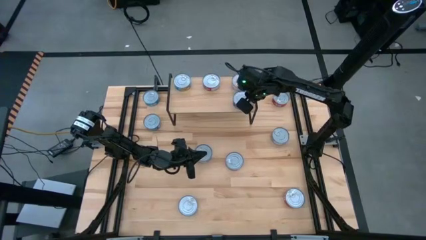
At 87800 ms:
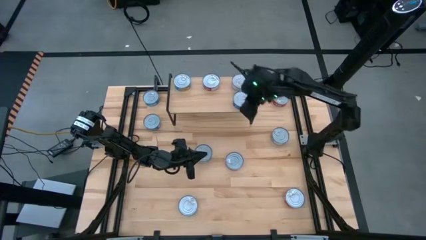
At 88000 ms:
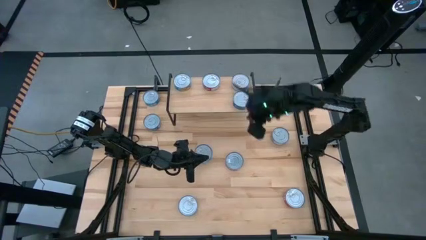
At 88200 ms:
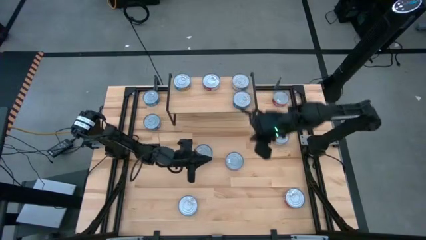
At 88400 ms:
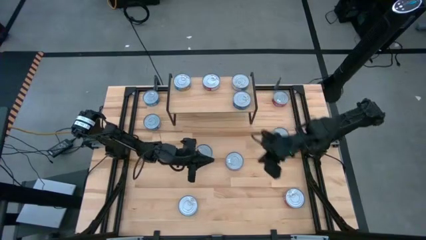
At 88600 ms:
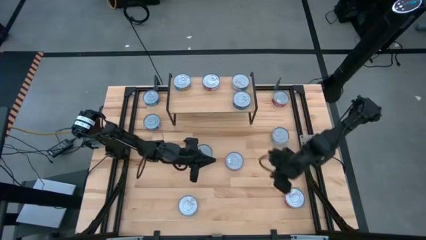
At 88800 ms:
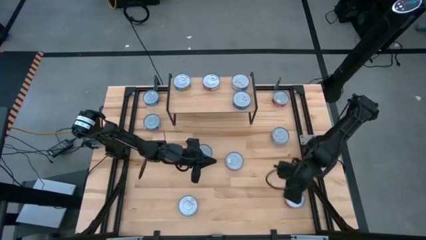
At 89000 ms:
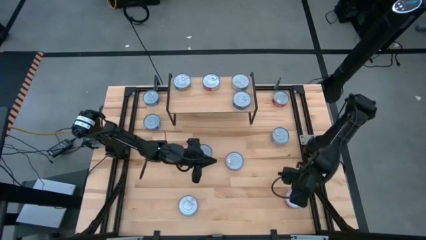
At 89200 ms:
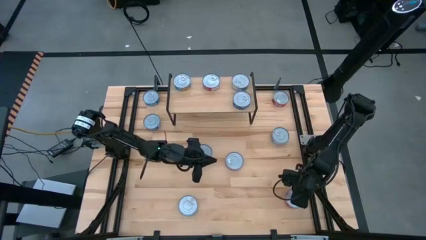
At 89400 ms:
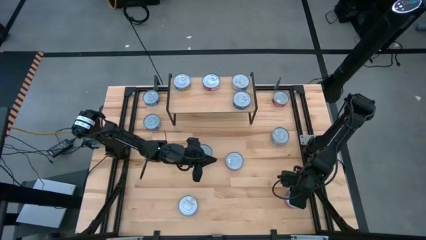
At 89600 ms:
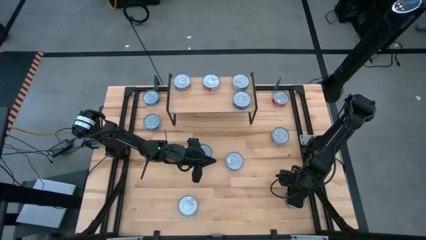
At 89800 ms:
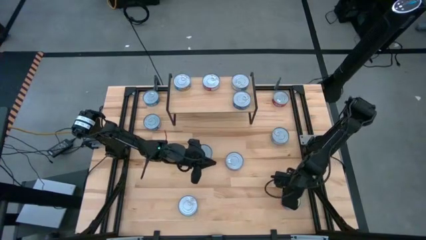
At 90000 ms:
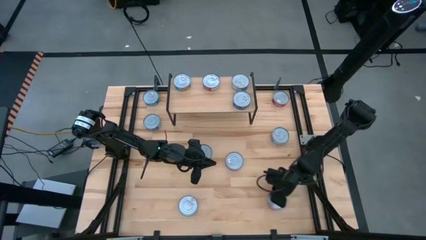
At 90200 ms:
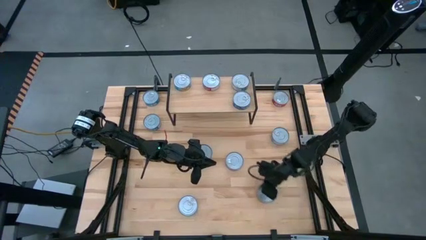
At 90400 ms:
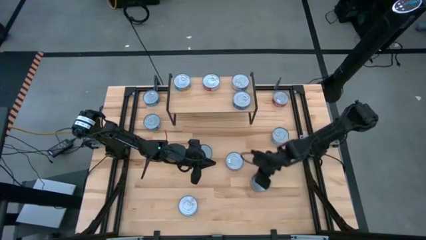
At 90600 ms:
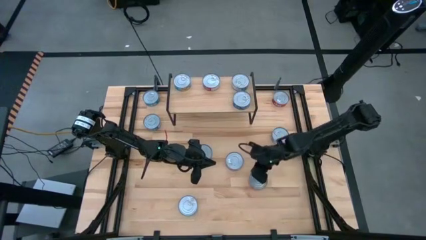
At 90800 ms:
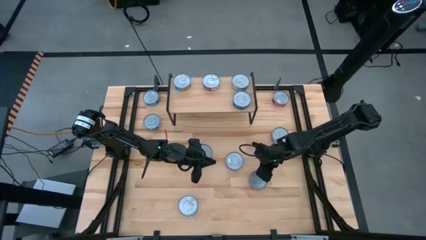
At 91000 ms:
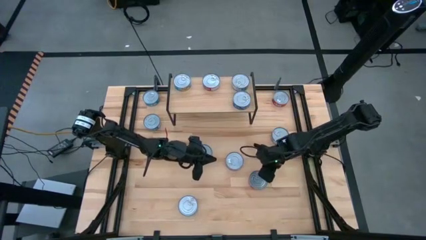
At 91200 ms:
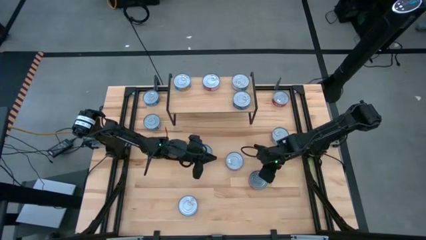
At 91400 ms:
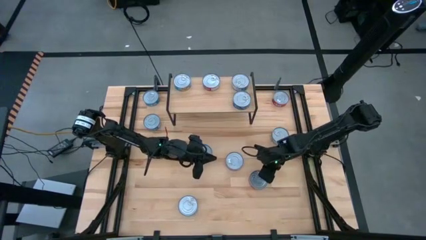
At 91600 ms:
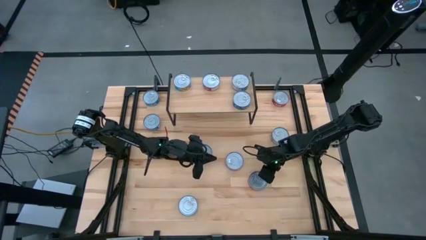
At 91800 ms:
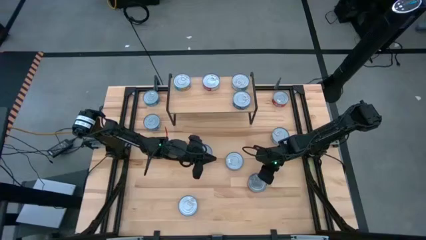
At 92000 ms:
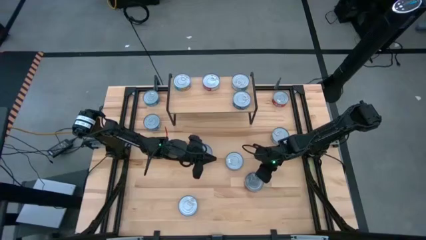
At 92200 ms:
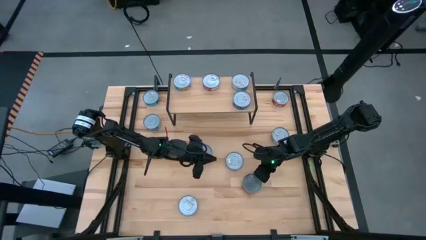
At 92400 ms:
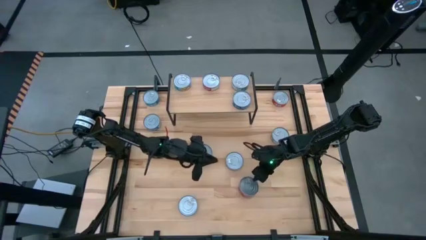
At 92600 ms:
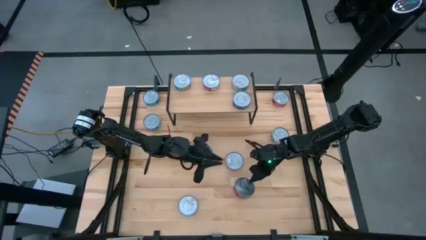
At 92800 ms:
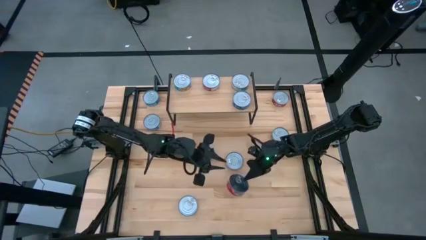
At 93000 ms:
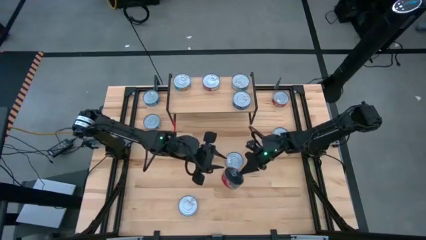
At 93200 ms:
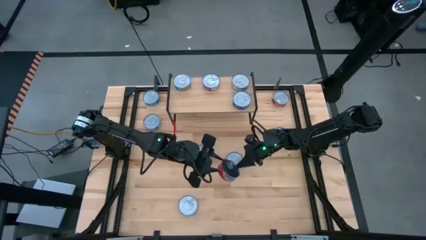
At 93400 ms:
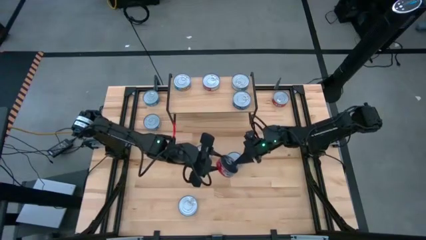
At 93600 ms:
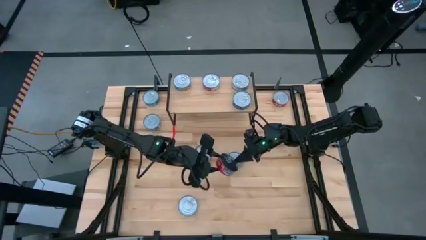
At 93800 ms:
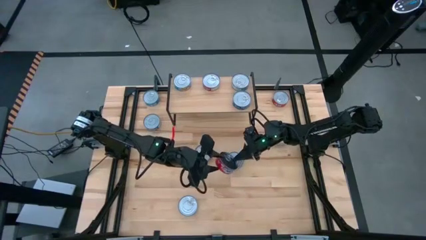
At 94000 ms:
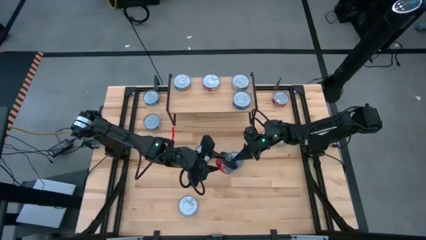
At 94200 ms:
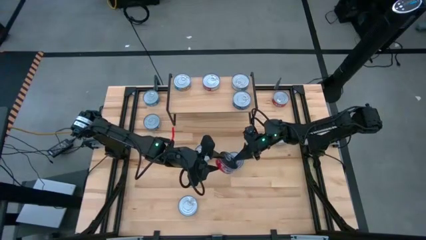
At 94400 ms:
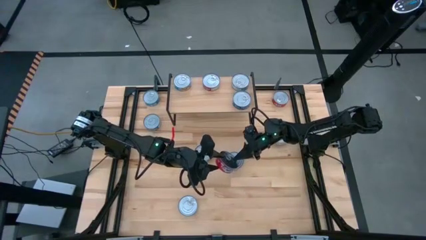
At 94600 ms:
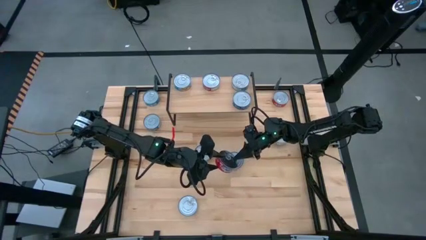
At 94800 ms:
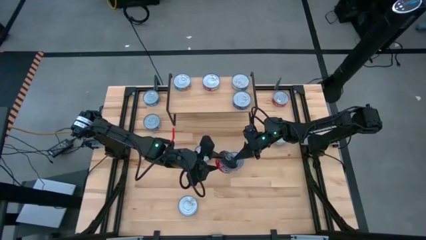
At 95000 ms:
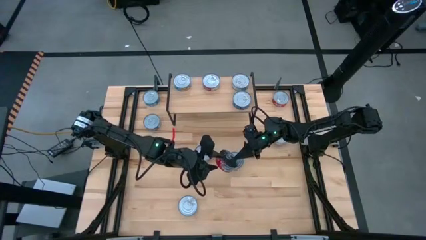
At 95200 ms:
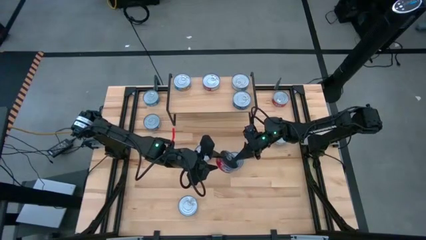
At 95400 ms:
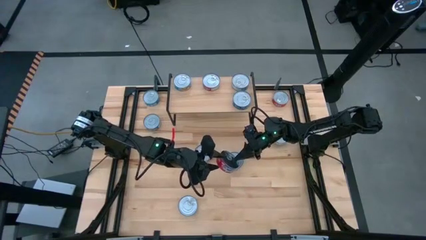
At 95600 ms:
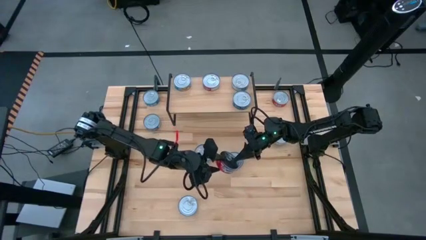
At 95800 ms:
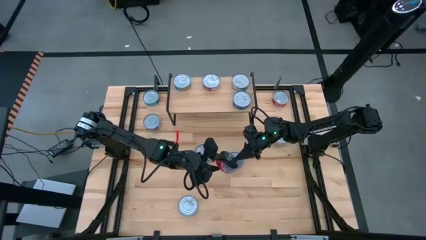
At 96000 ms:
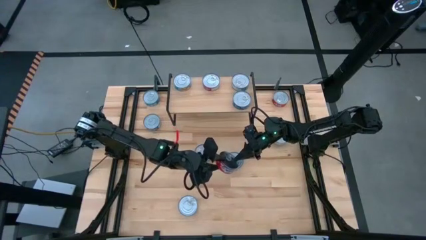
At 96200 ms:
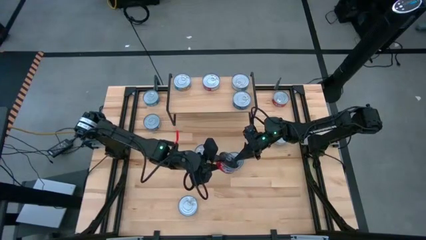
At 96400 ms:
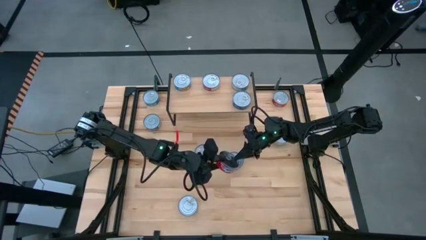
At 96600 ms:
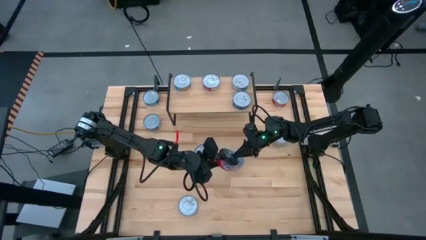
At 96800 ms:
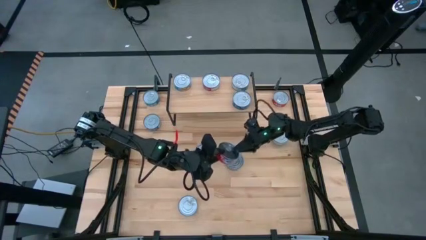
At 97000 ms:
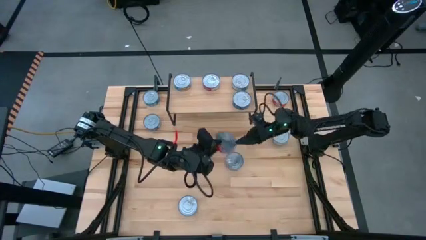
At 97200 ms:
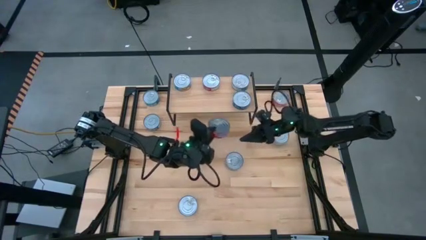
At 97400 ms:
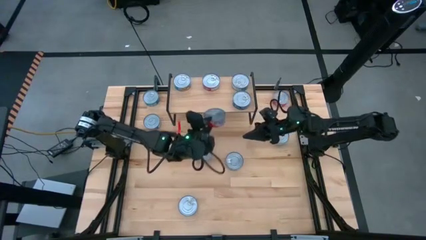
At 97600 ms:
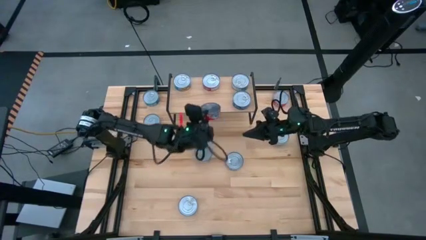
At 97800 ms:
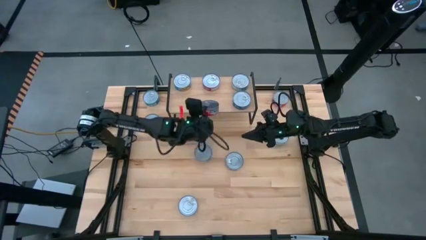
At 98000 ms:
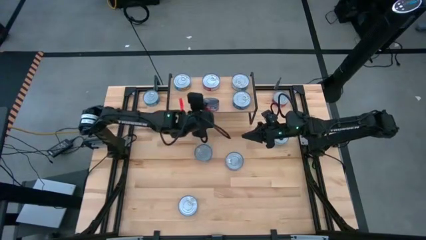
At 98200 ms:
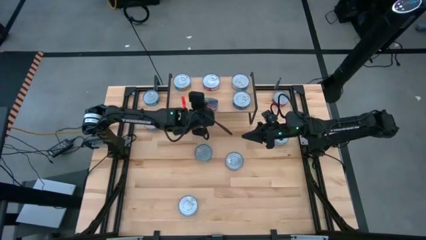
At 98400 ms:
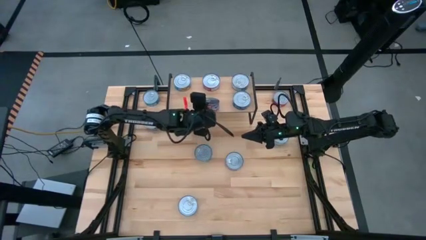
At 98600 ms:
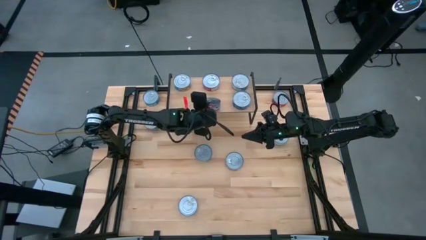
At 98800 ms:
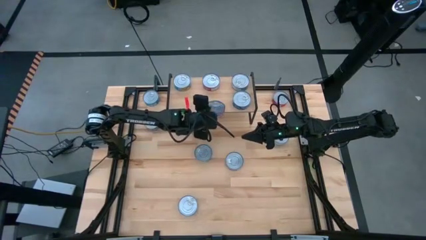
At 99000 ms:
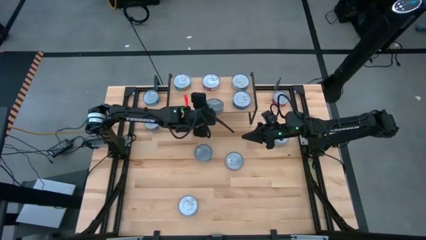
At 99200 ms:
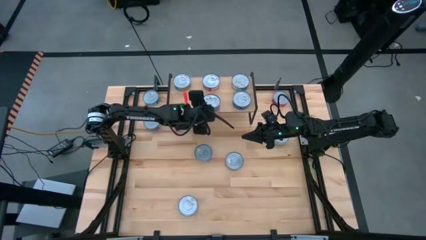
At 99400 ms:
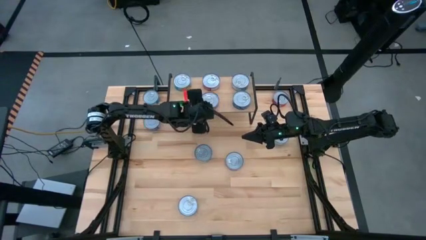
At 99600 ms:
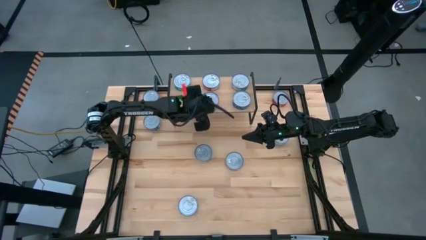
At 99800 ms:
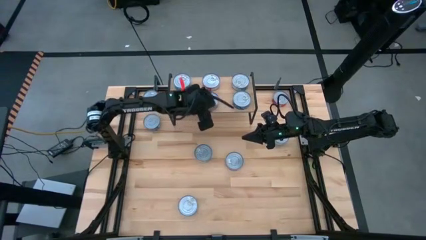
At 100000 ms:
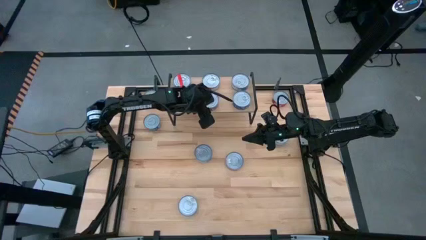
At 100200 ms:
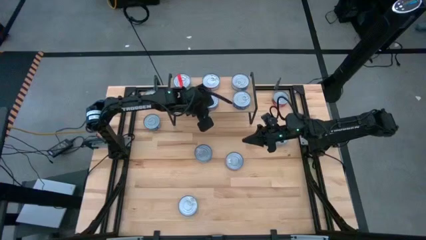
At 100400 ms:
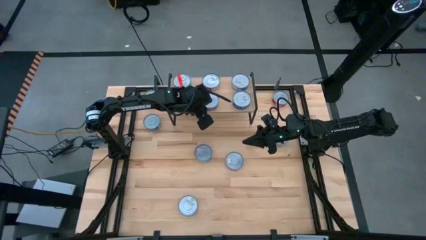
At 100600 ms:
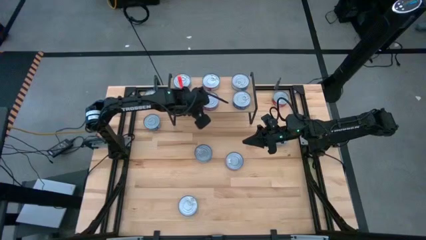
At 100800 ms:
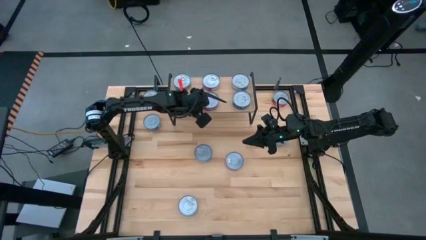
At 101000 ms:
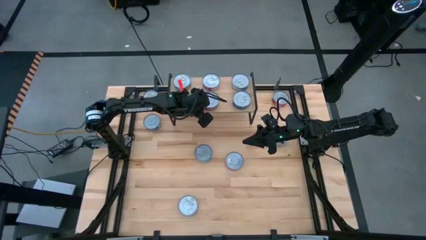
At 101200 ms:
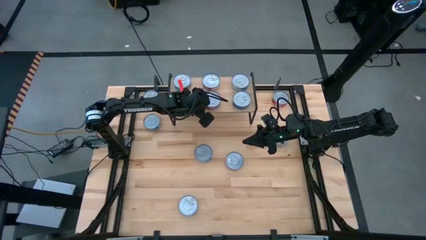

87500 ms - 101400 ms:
Task: Stack canned seafood by type on shelf
Put the bottom right red tuna can on the shelf aligned with the other red tuna can

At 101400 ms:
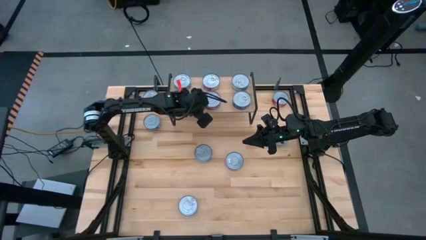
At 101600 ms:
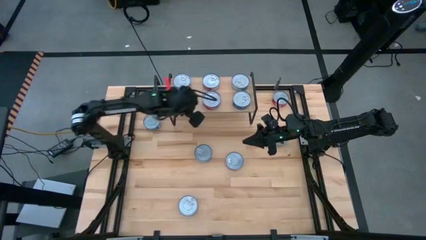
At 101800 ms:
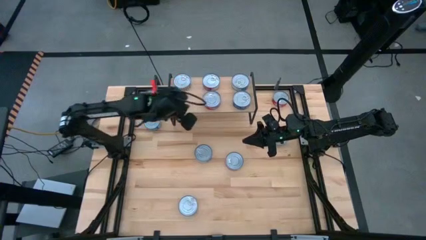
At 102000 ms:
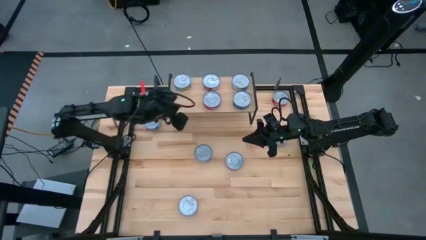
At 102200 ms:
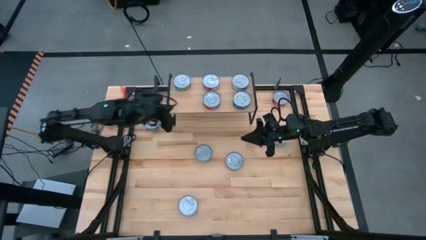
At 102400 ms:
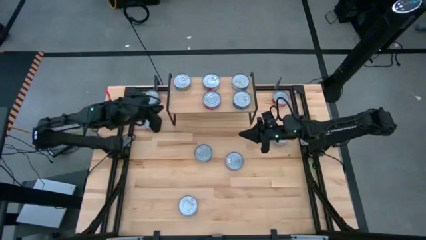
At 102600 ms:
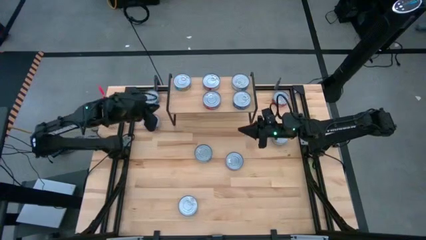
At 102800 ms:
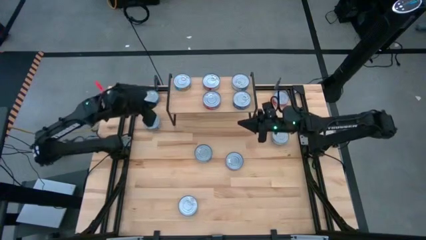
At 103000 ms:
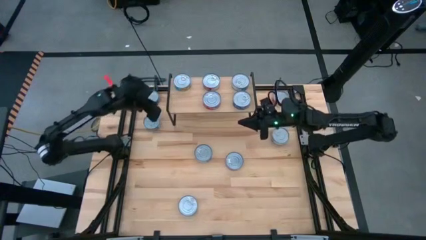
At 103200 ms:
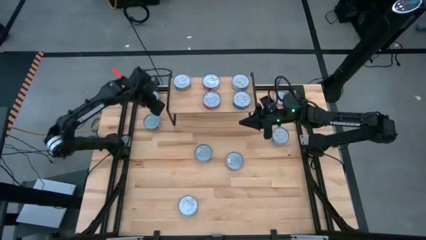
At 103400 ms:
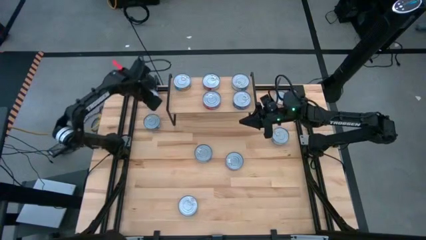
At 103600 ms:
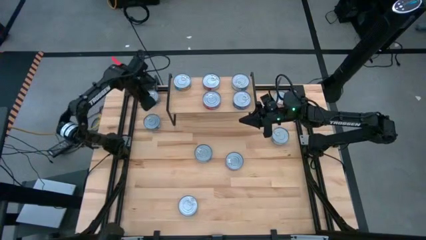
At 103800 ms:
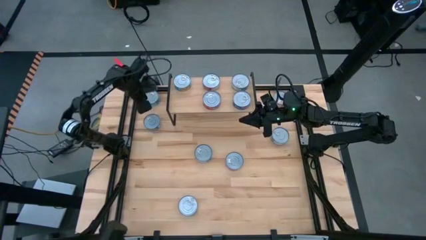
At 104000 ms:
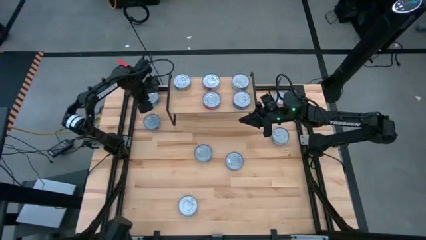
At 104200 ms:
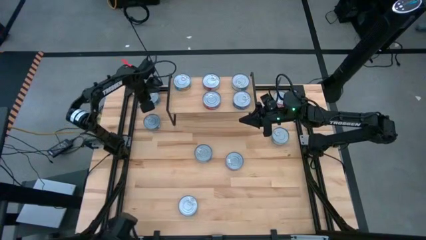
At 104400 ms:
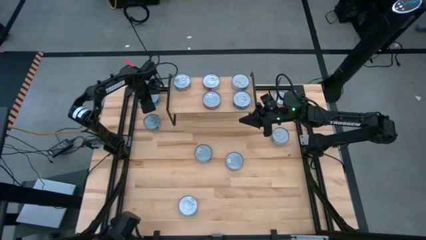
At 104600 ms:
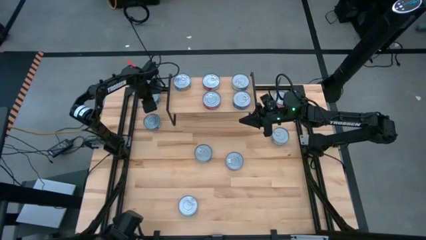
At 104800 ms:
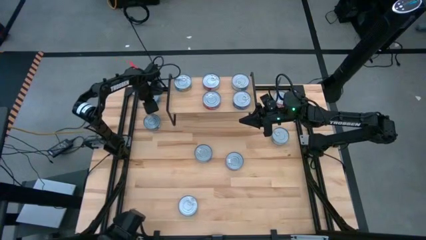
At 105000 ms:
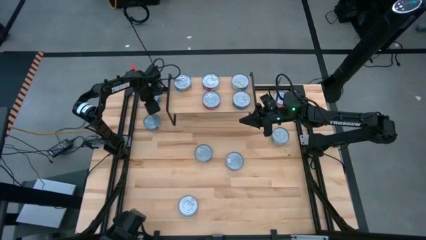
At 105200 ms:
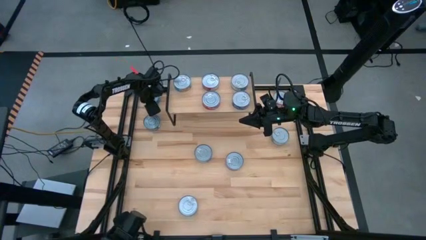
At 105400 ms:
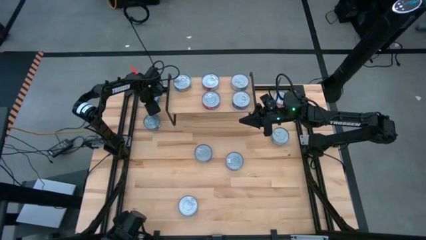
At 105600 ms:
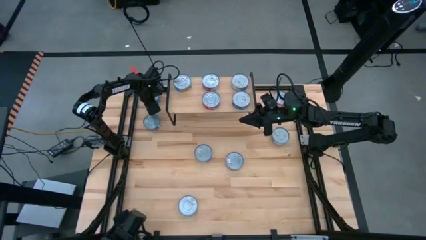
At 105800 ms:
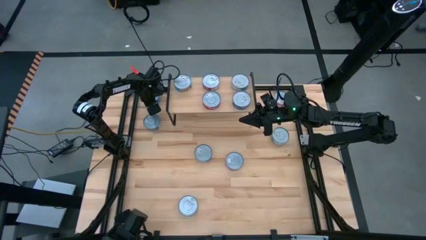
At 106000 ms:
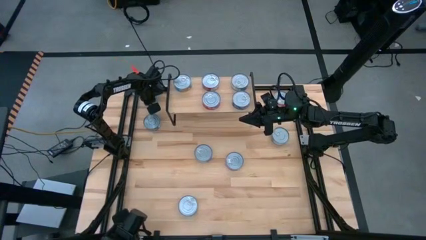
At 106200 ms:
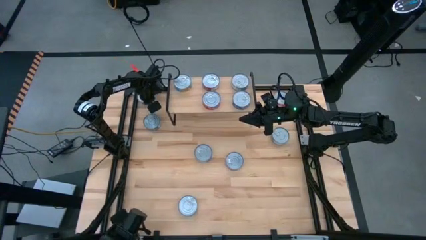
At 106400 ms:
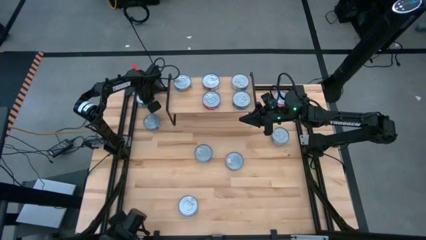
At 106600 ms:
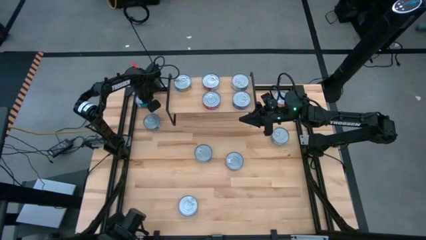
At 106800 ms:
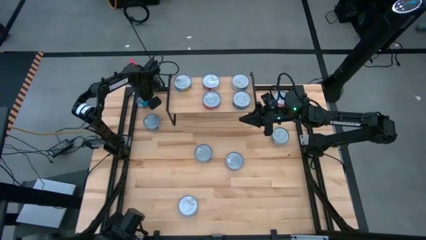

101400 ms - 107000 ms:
Put the top left yellow and blue tuna can on the shelf
